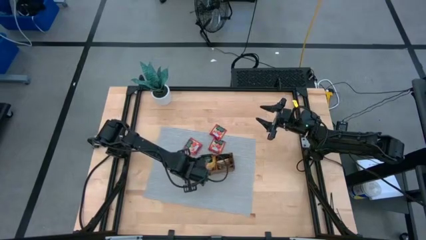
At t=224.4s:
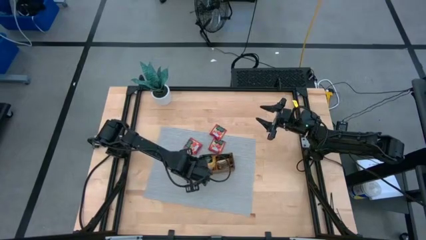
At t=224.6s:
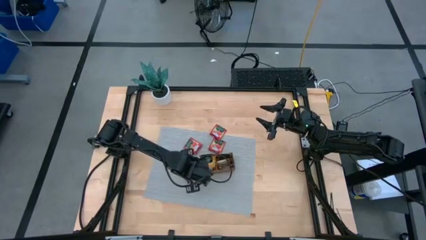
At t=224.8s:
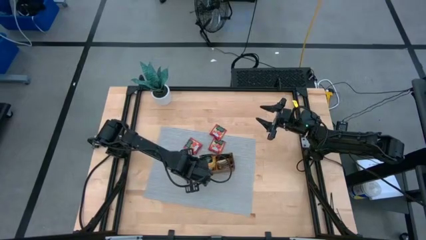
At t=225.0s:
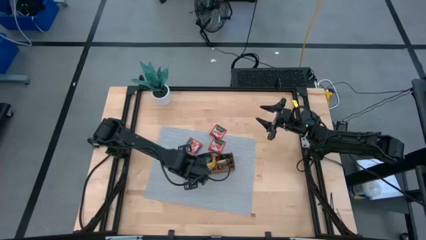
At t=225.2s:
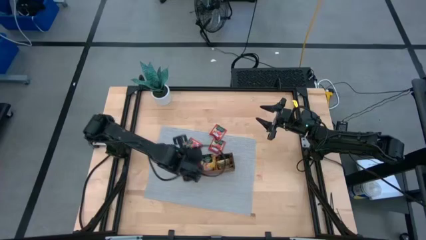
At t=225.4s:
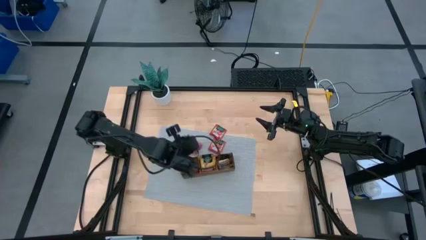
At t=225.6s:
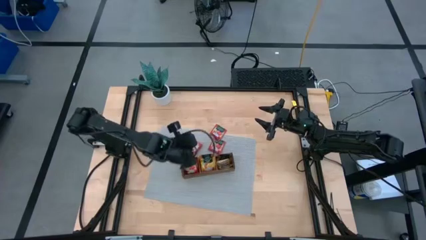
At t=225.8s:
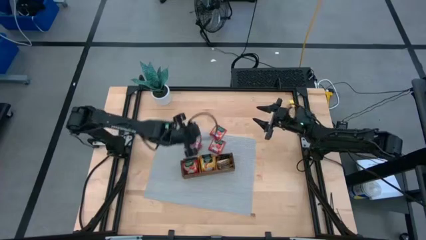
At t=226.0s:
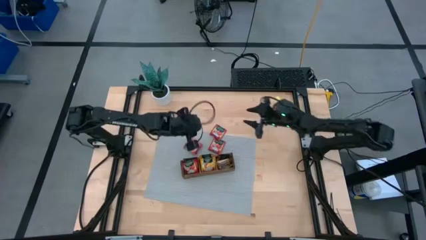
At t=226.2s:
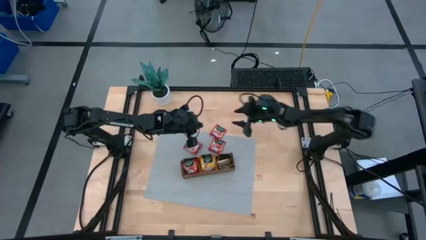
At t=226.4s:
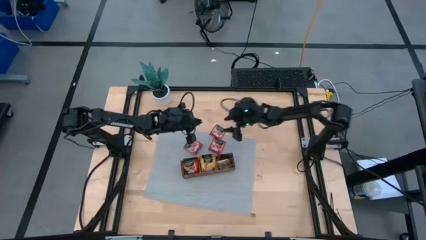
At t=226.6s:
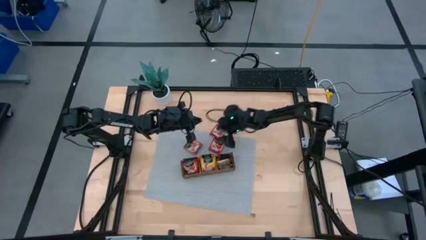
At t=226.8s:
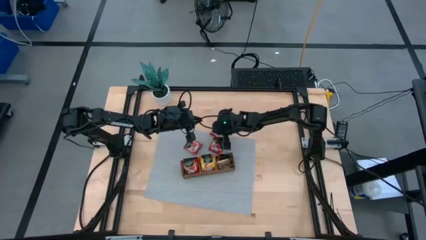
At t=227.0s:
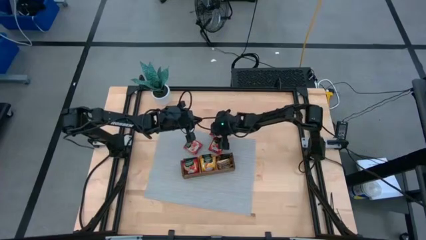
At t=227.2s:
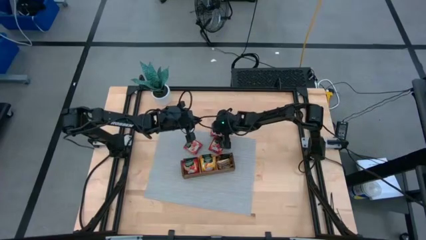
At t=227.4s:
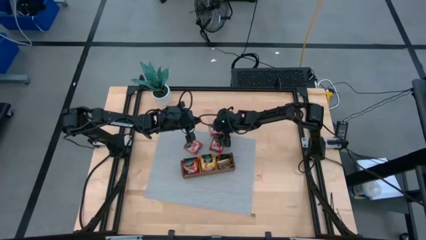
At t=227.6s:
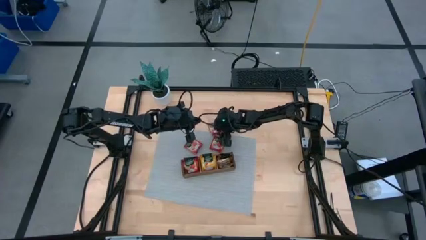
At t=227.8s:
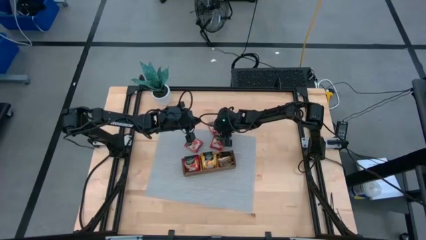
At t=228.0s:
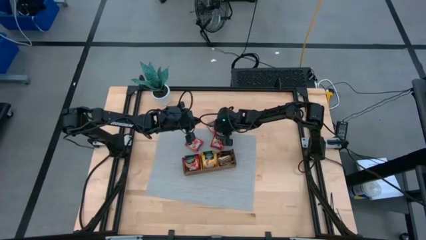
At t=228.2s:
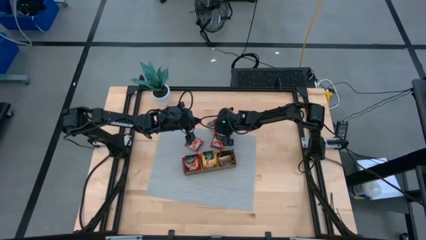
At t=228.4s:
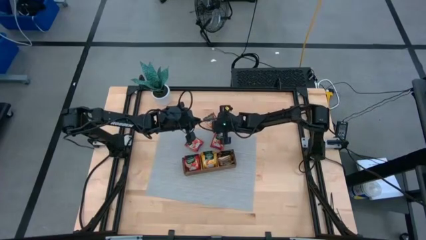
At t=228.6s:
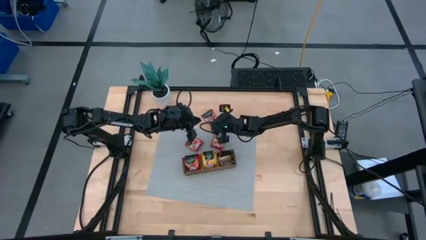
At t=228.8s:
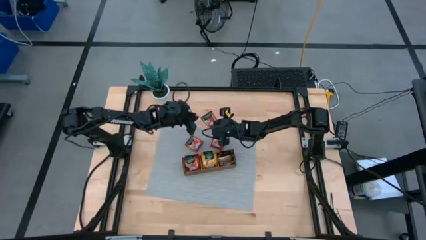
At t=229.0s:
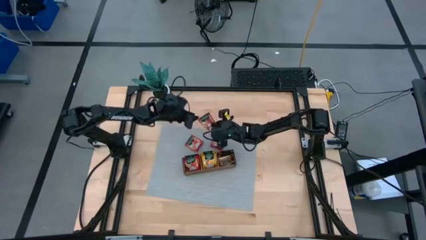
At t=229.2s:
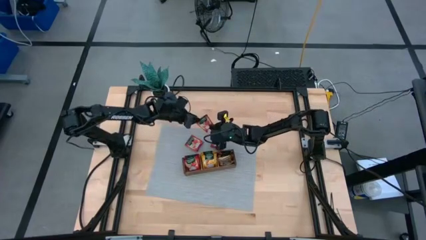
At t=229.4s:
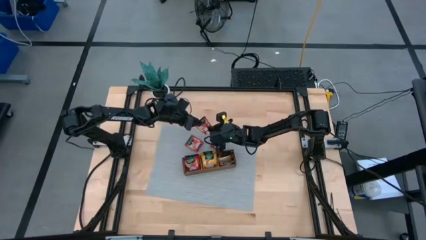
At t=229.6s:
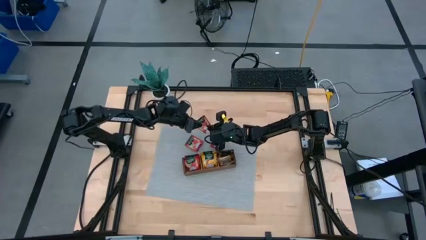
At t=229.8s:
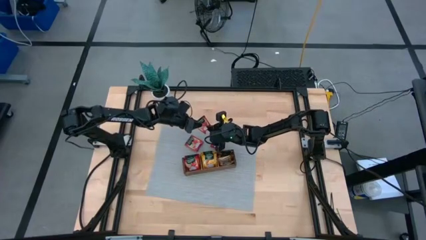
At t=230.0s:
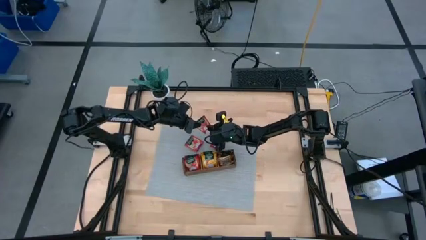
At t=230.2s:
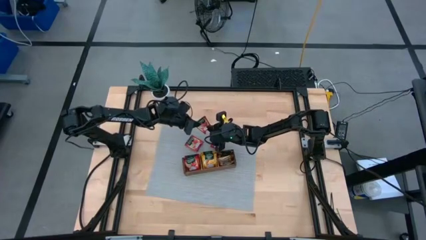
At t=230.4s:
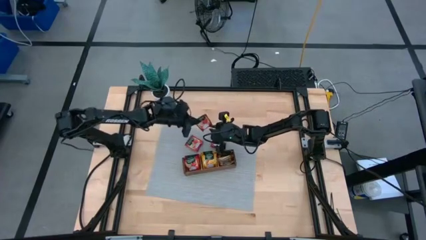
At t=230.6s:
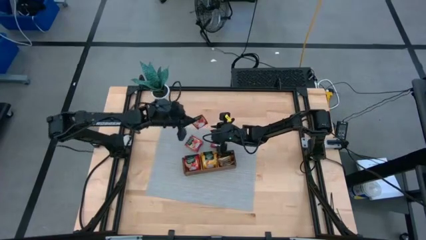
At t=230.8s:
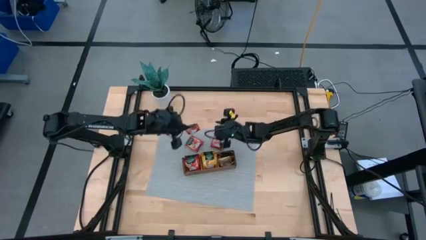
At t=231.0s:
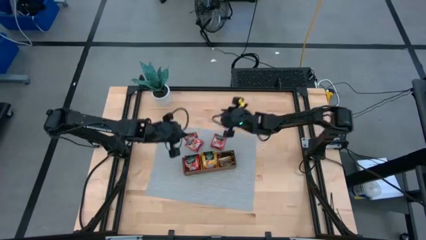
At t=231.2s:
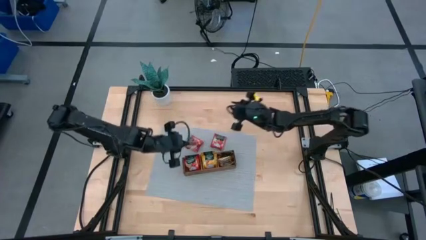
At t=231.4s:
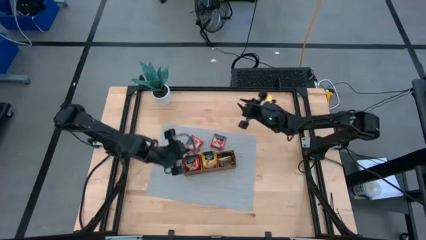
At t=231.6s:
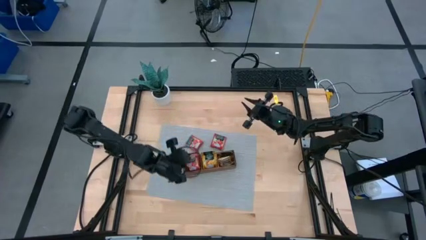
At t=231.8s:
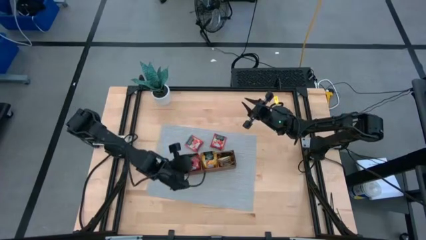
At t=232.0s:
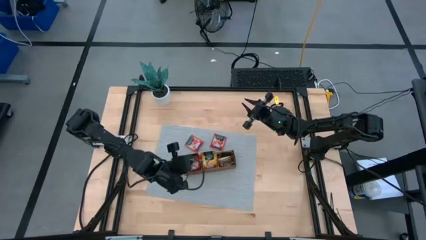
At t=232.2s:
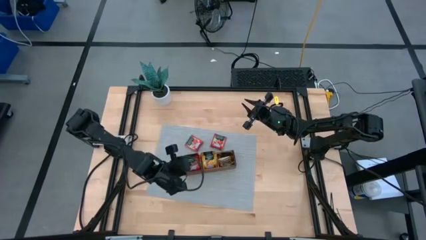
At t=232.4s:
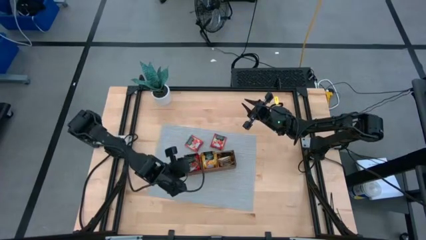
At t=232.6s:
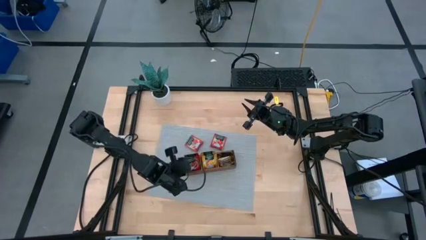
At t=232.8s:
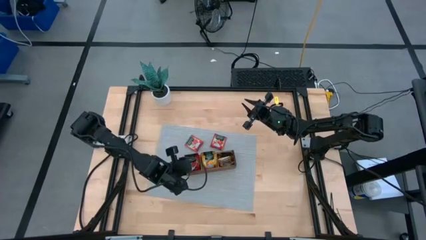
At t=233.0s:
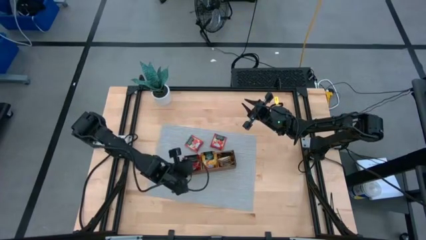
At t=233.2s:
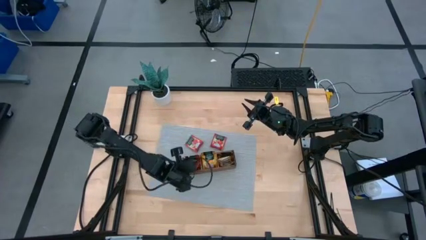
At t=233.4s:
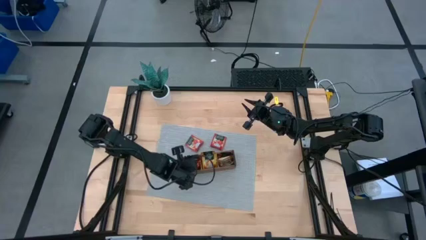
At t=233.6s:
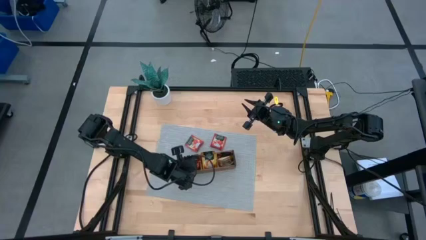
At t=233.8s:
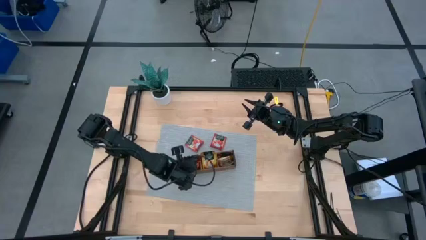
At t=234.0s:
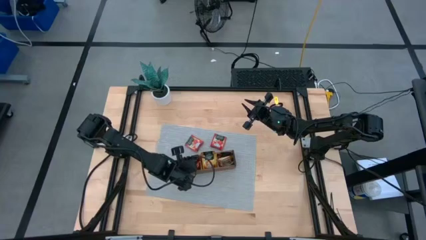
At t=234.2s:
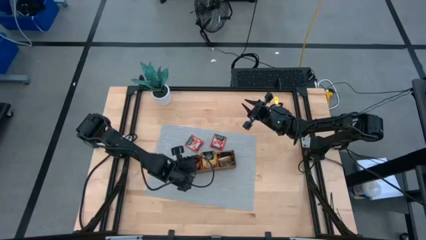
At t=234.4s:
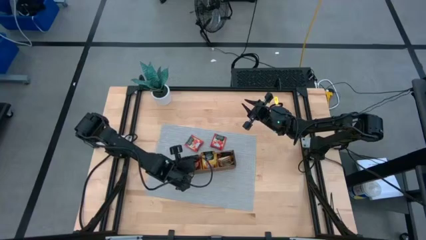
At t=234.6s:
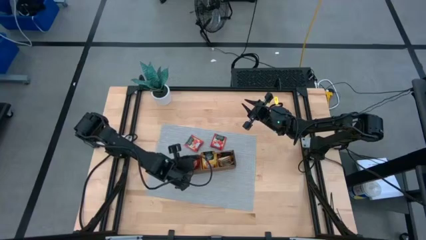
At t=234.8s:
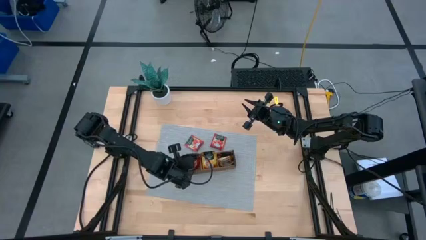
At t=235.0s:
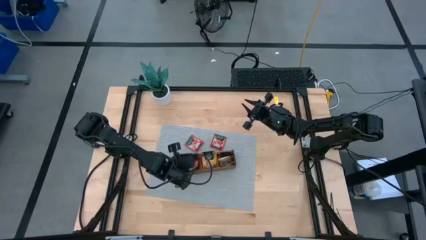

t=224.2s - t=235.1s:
Task: Pick & Place Tea
Put the red tea bag into the left compartment of the wood organizer

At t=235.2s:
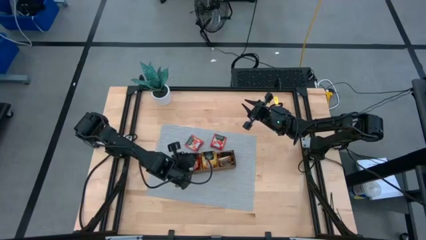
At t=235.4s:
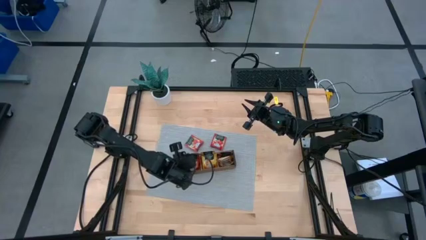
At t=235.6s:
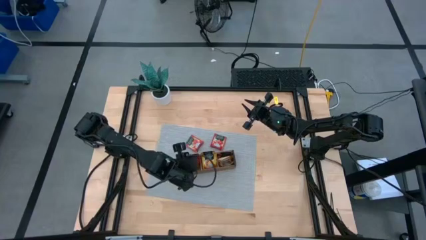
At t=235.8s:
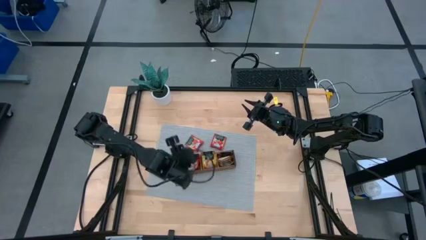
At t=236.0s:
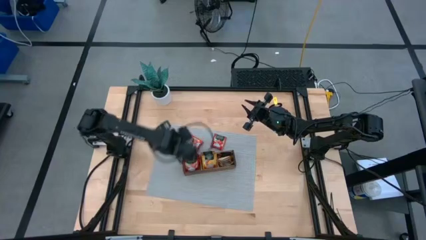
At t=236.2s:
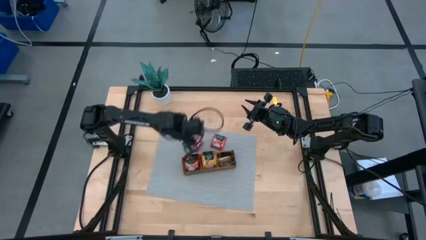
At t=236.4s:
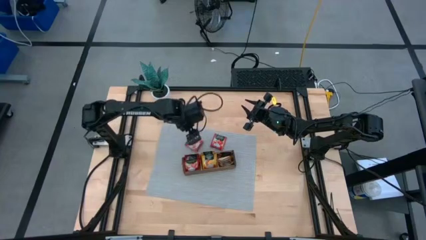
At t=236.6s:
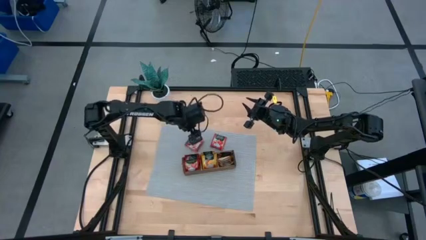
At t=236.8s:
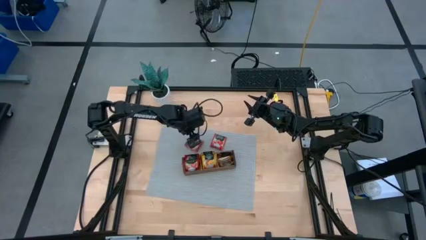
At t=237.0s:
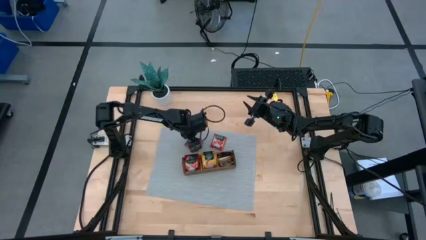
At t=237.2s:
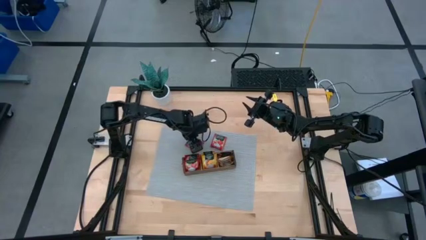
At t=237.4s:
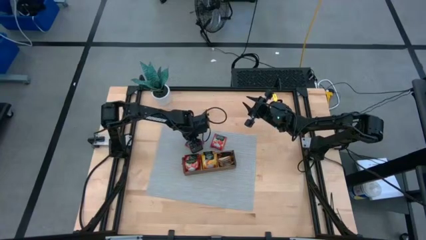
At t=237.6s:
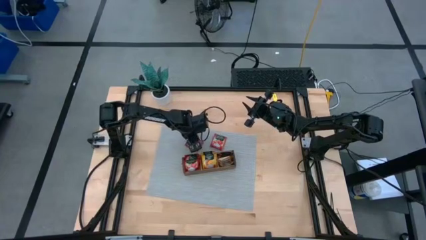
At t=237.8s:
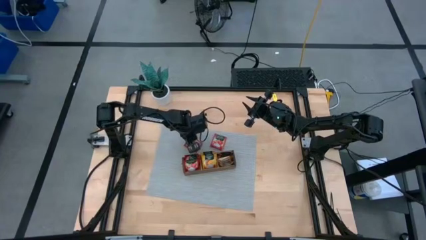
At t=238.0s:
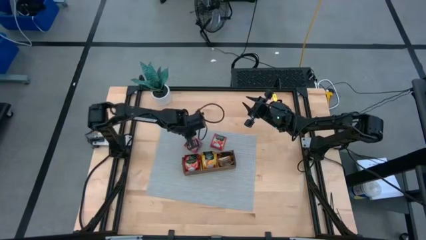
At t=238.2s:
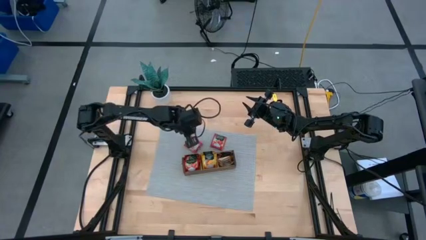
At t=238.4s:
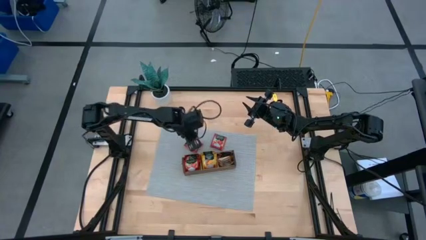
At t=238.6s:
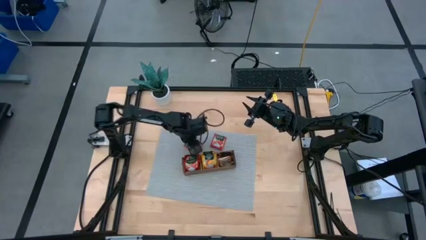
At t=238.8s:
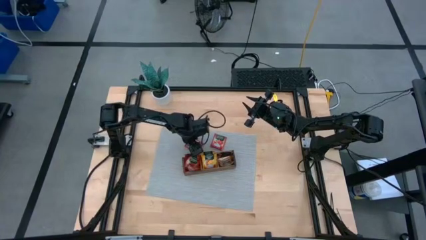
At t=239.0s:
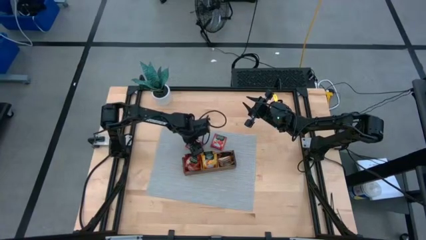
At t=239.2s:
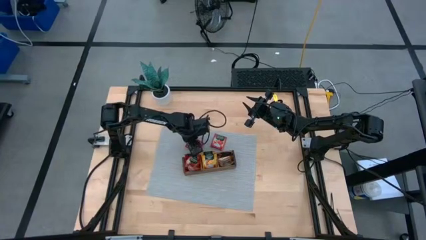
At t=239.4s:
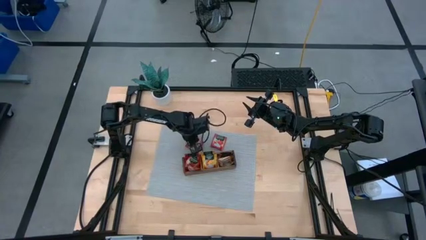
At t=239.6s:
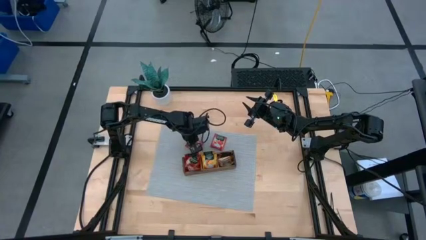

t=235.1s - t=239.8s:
Put the red tea bag into the left compartment of the wood organizer

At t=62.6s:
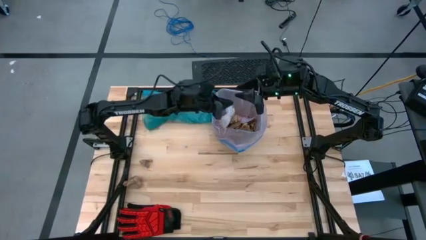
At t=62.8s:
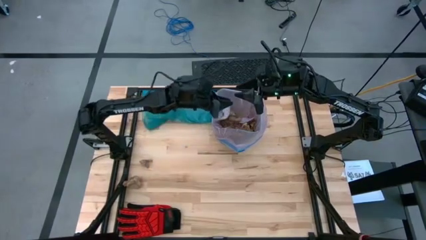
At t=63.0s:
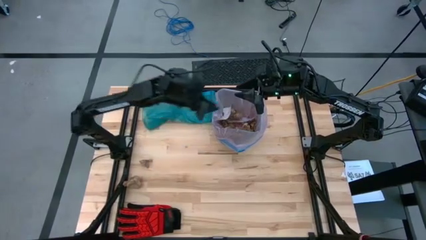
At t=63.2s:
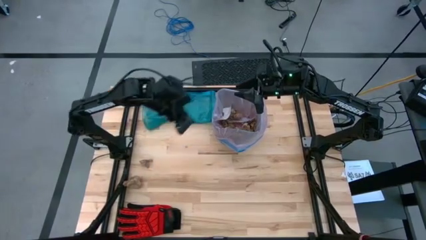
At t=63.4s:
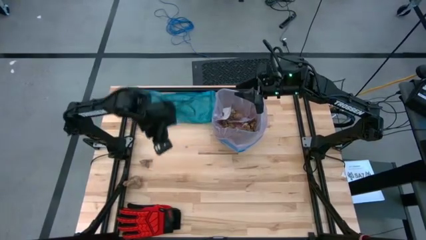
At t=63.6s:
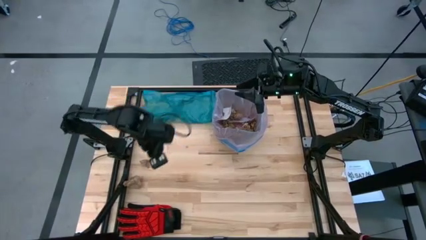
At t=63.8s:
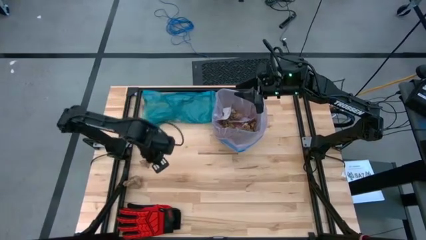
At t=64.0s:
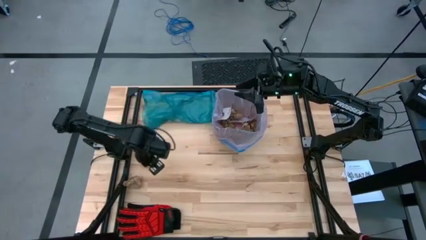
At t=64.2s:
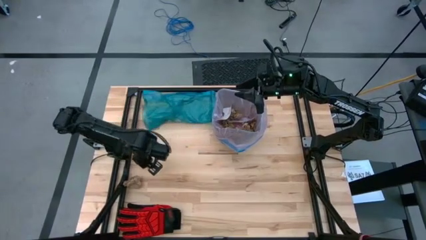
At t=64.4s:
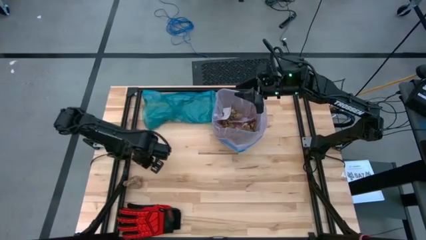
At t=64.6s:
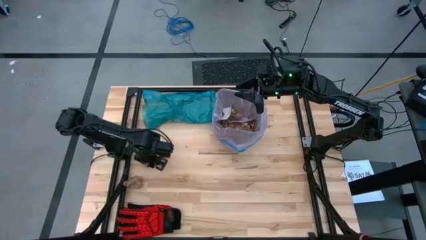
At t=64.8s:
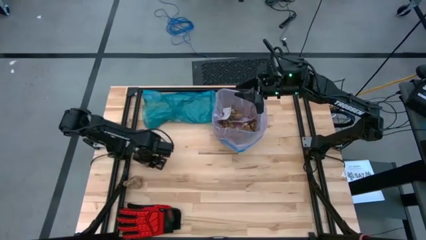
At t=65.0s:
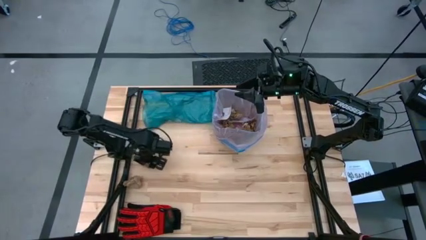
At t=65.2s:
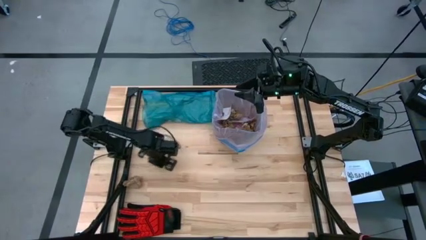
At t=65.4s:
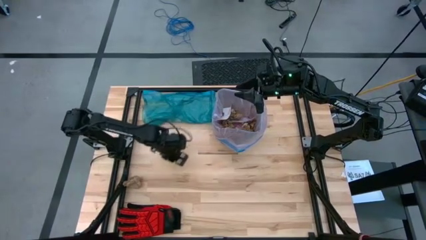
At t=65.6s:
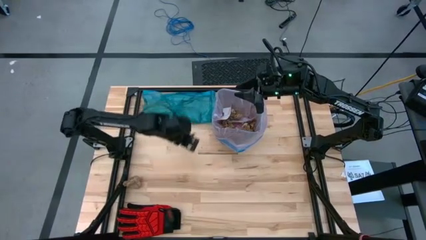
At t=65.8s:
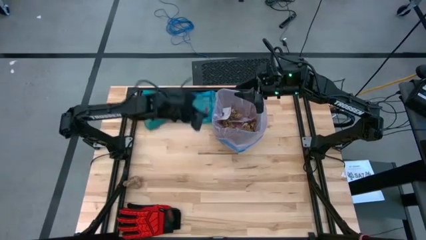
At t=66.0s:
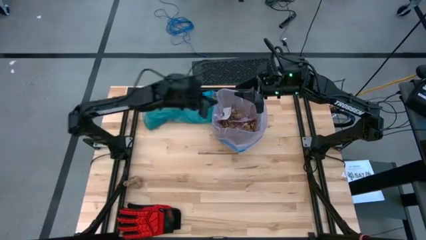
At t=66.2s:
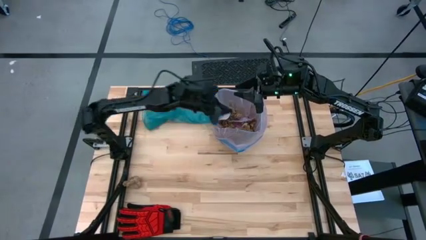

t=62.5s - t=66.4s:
Task: place trash/remove bag and relplace
Put the brown paper into the black trash bin
